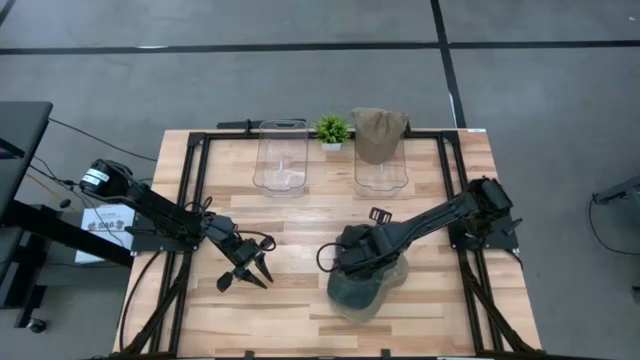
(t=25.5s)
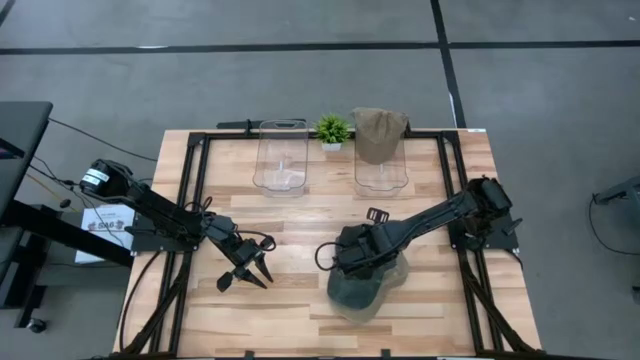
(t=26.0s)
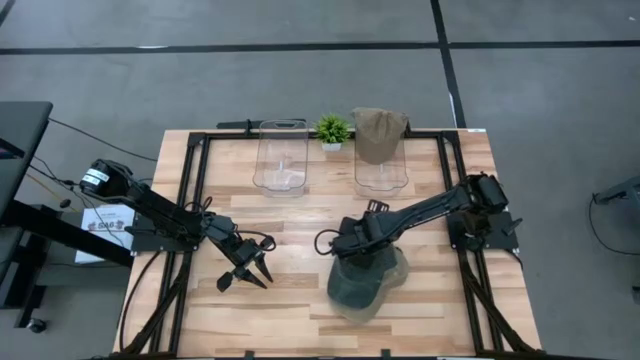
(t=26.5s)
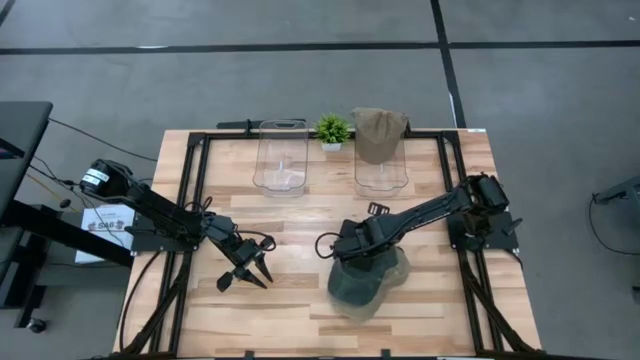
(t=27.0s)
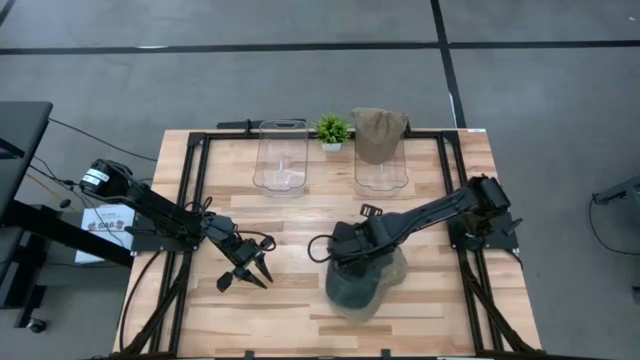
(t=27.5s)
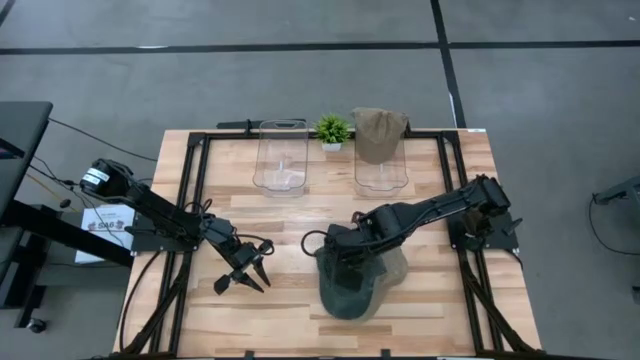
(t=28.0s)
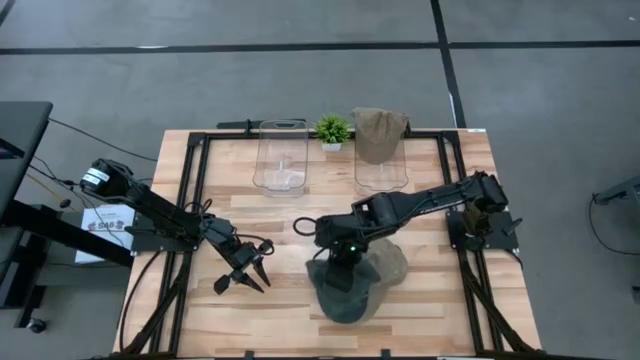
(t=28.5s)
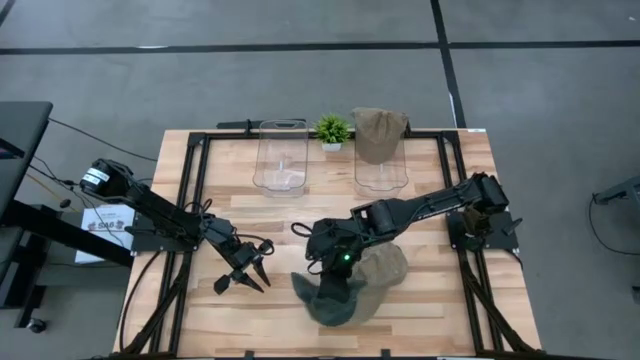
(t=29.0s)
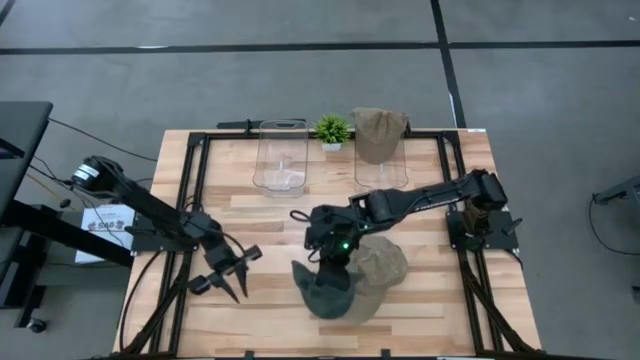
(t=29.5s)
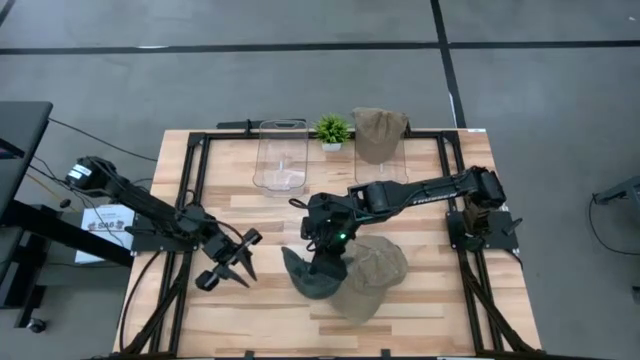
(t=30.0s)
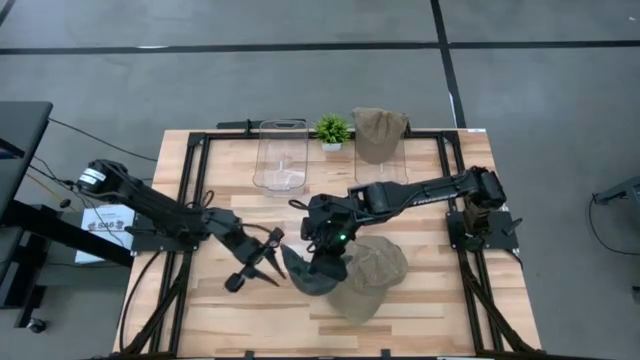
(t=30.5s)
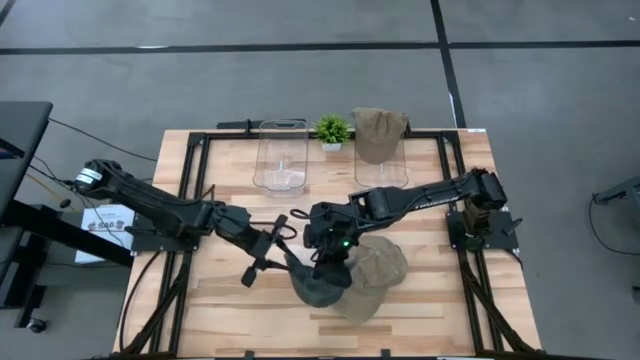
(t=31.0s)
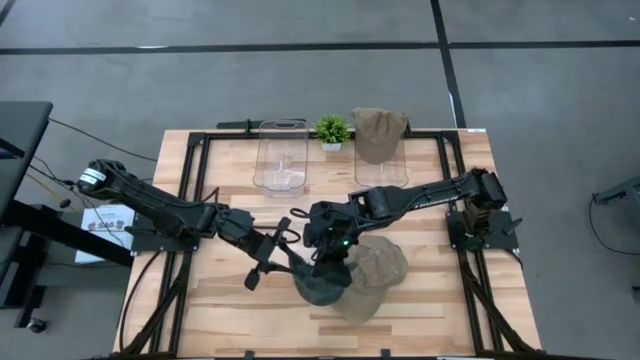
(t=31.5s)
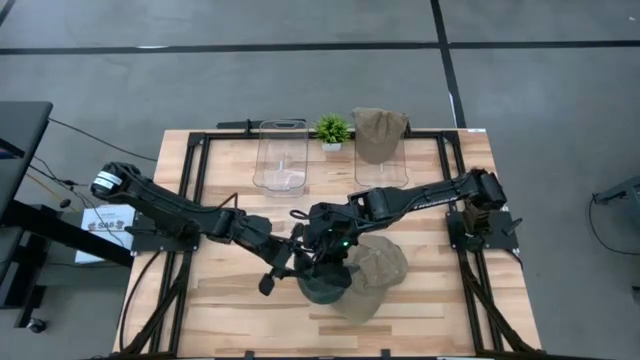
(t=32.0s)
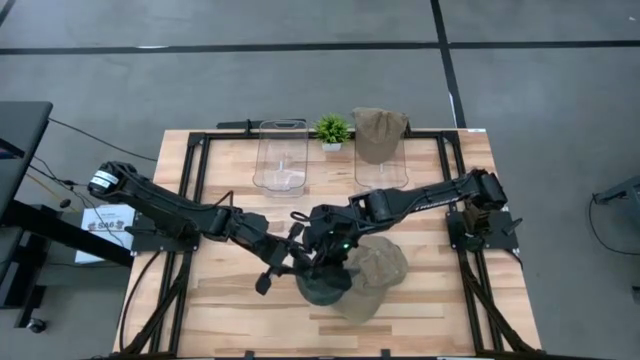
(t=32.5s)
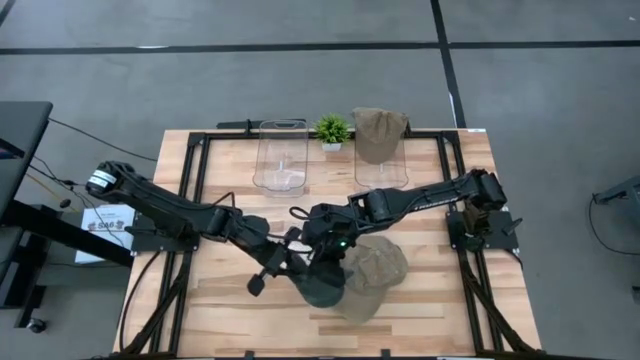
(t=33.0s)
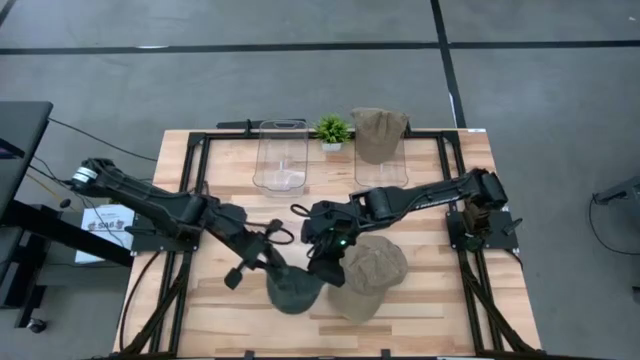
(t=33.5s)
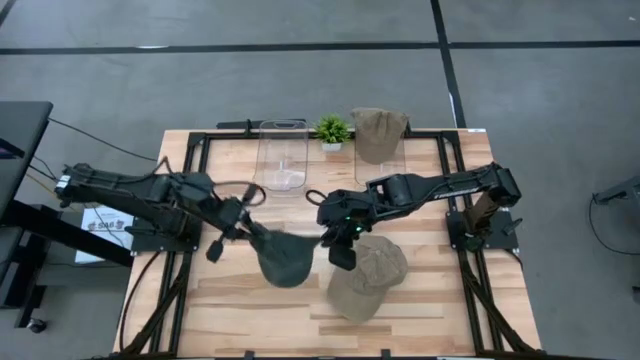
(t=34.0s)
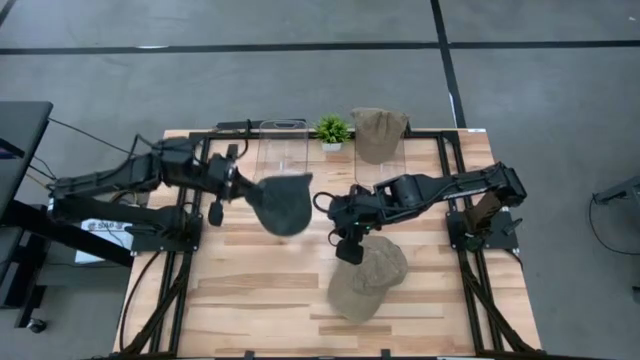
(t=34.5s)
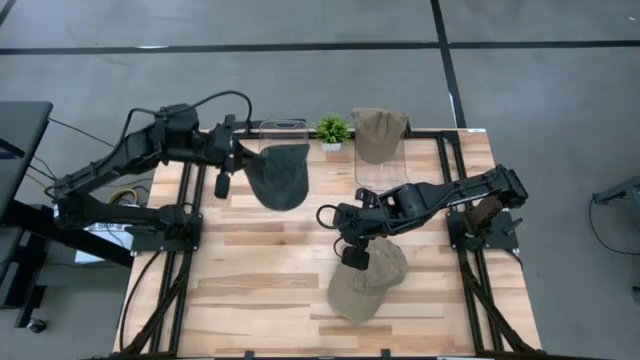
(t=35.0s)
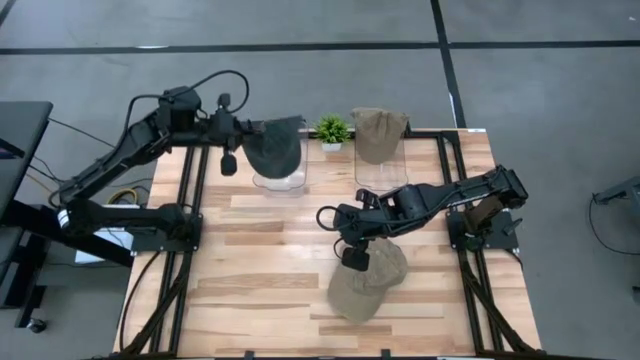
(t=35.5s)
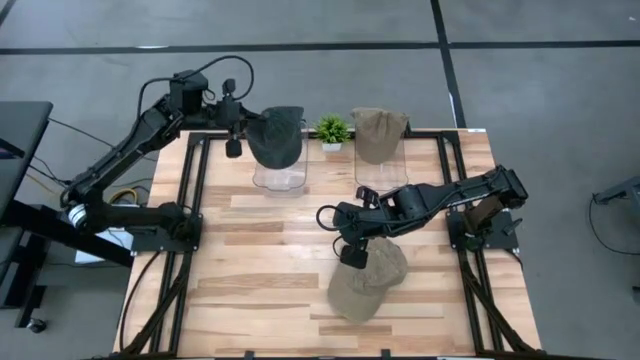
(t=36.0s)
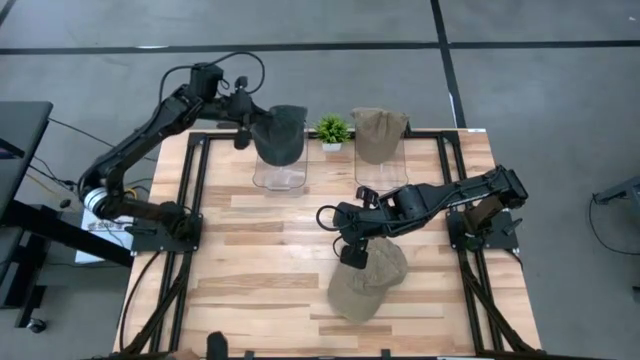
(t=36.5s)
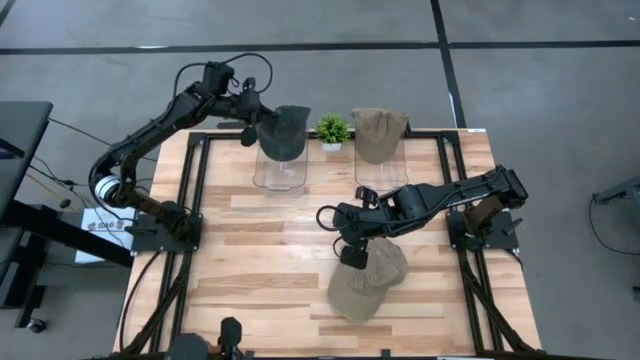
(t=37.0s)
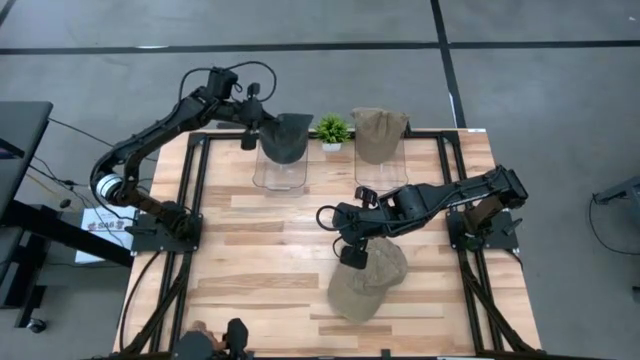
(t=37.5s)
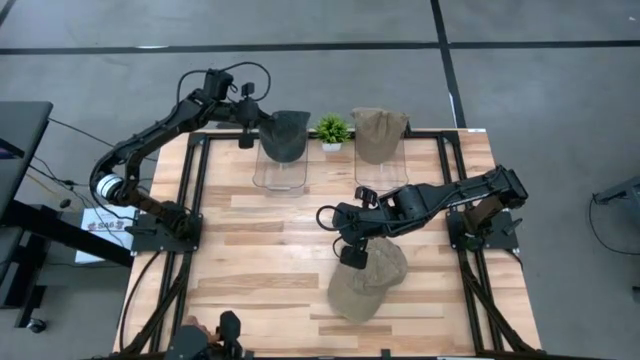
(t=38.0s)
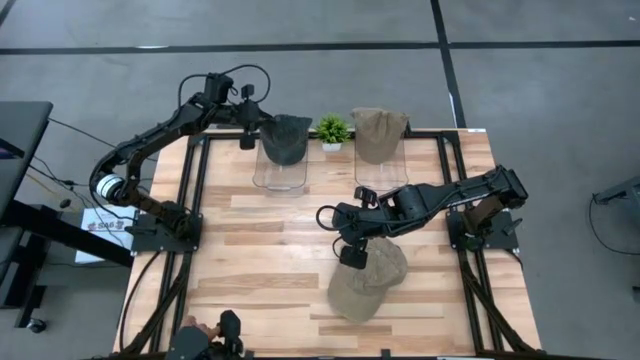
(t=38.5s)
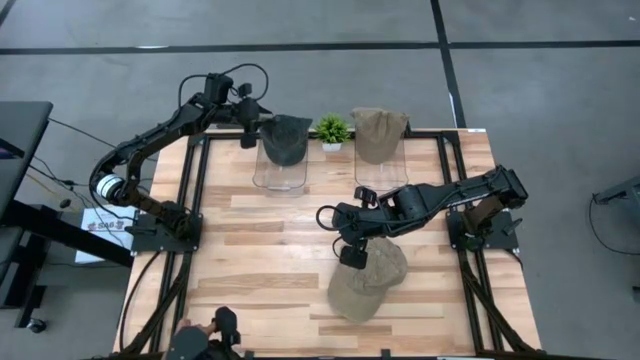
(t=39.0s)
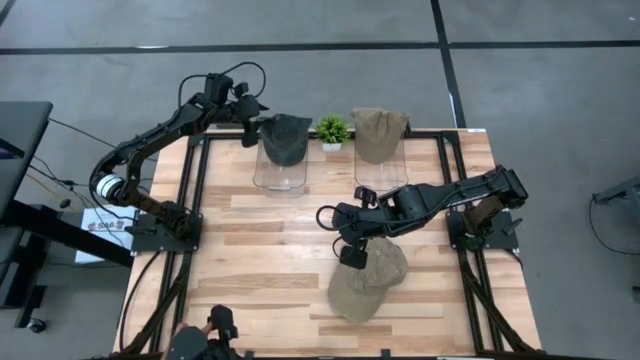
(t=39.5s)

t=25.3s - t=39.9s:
Task: Pick & Place hat
Put the top blue cap into the left transparent bin

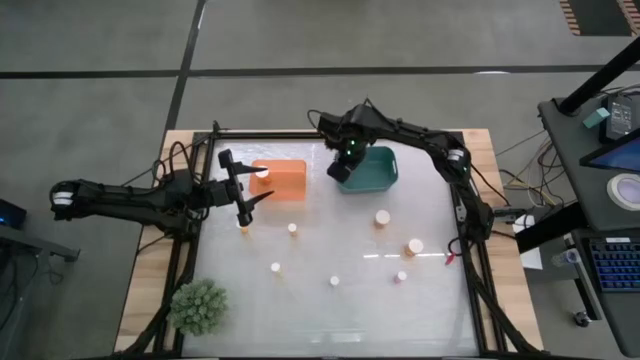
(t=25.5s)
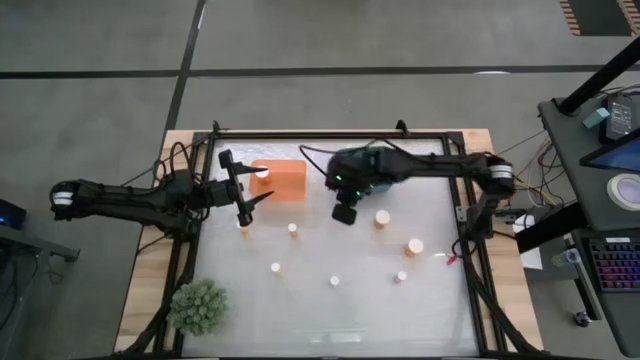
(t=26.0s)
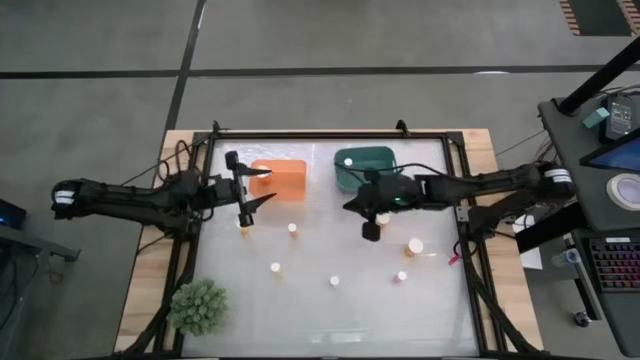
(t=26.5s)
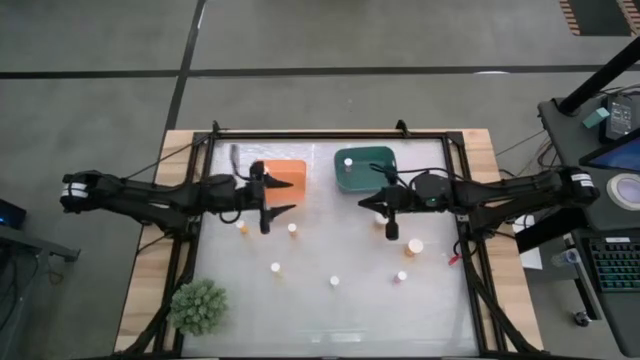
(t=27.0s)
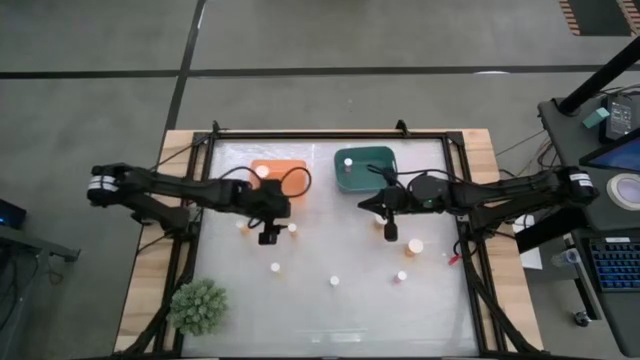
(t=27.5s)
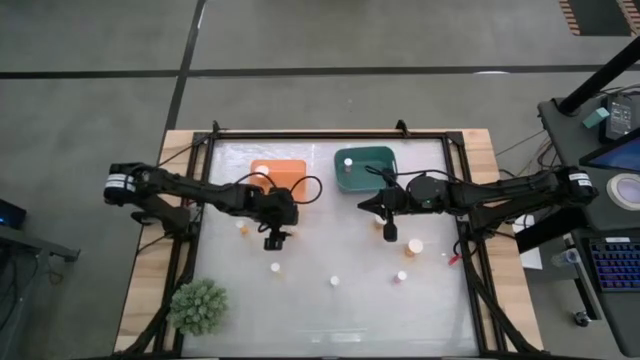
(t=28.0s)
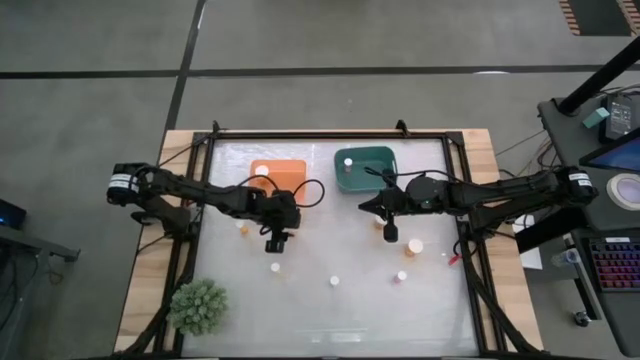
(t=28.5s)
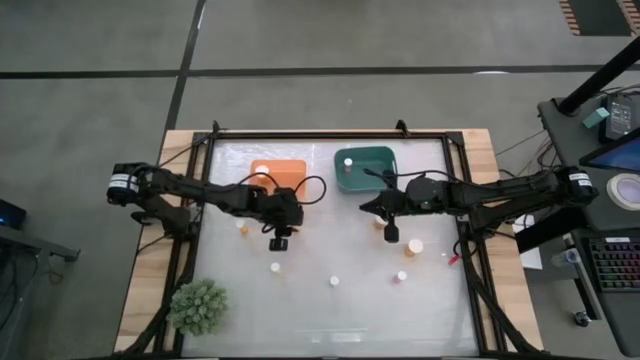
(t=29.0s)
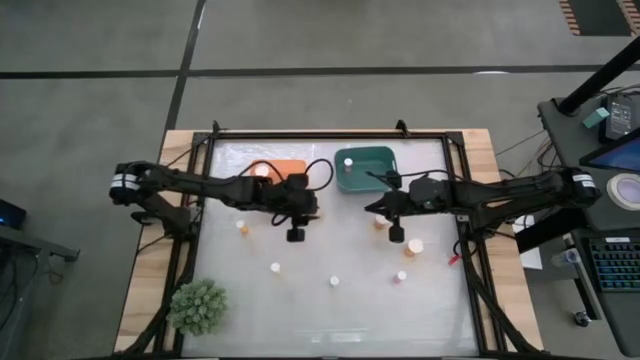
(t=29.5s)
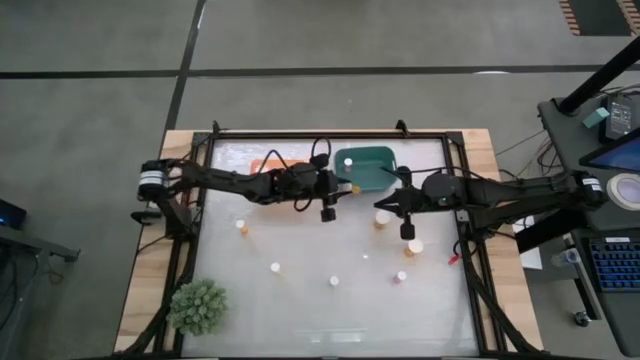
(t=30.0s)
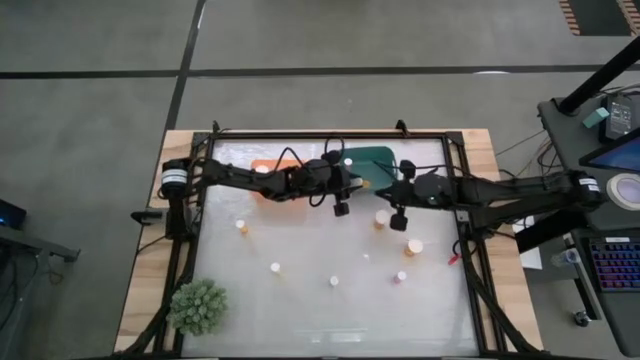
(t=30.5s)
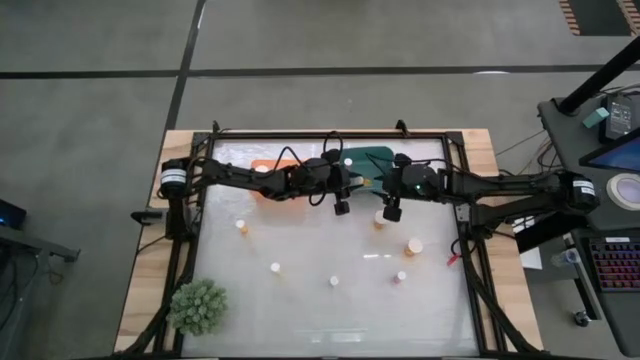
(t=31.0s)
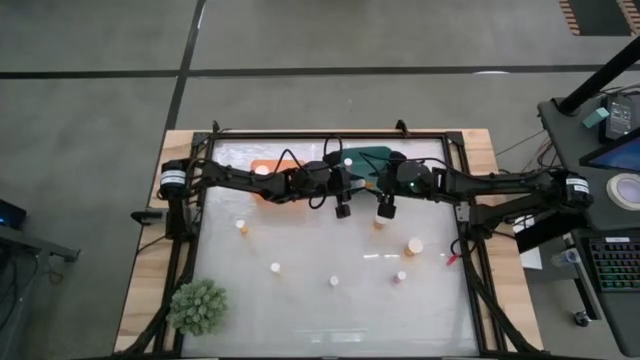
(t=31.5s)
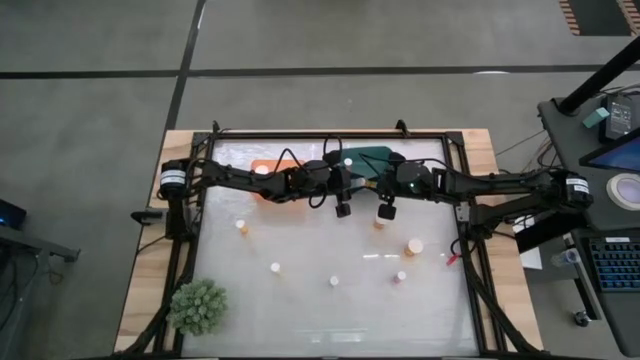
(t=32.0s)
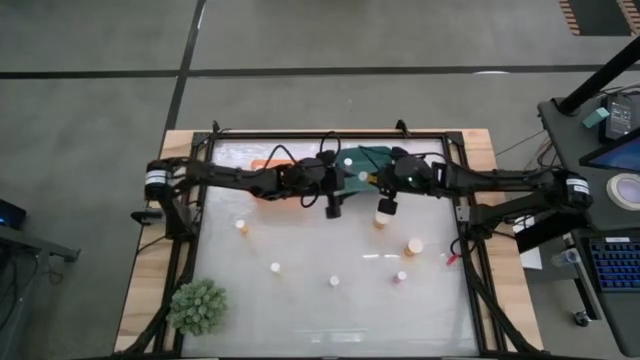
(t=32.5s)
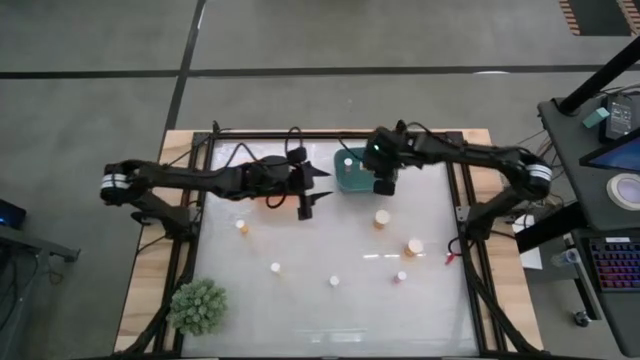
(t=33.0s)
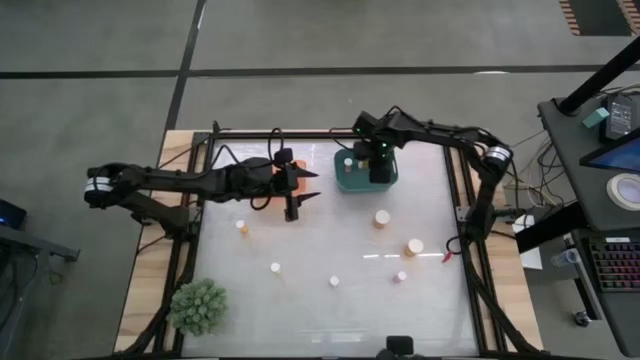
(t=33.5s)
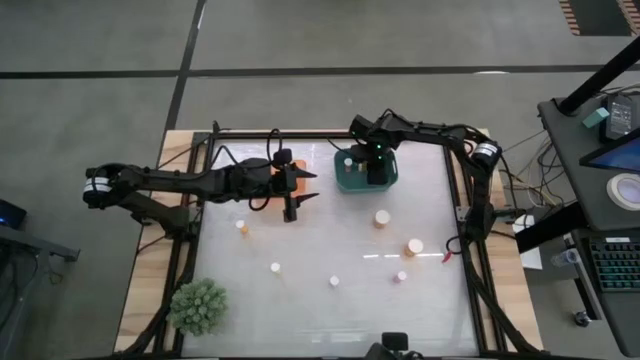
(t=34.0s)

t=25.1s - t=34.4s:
Task: Pick and place medicine bottles into bin by pill shape (circle, oval)
Put the right small orange pill bottle into the green bin
